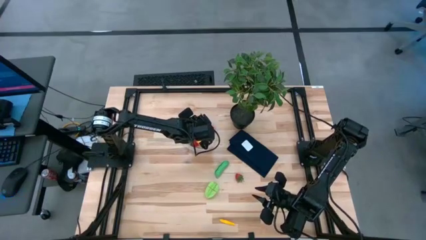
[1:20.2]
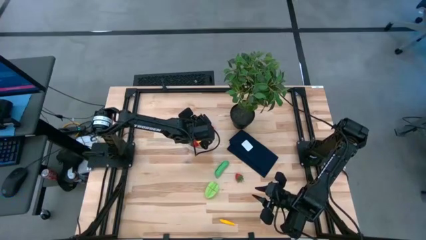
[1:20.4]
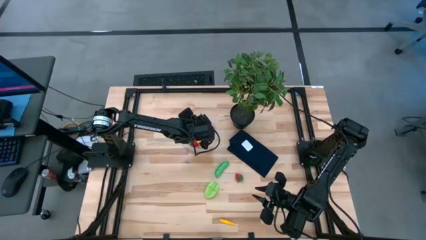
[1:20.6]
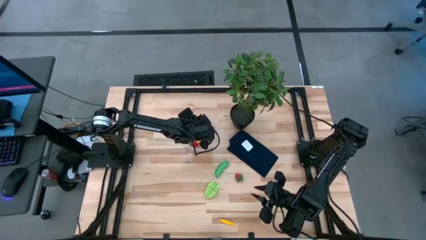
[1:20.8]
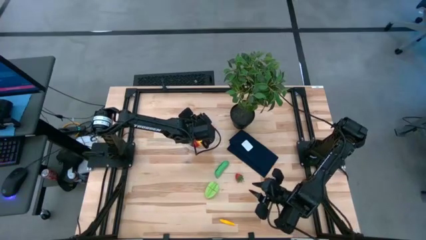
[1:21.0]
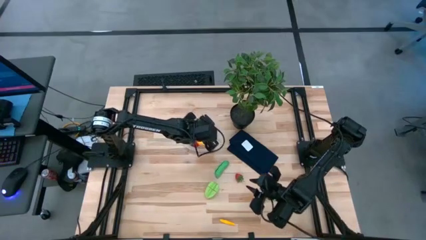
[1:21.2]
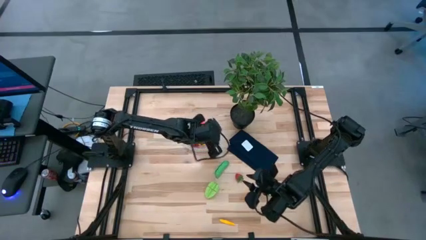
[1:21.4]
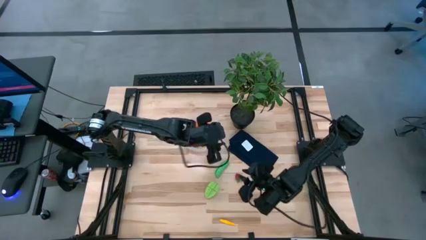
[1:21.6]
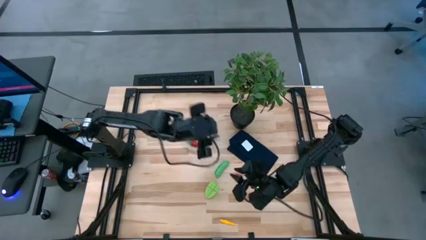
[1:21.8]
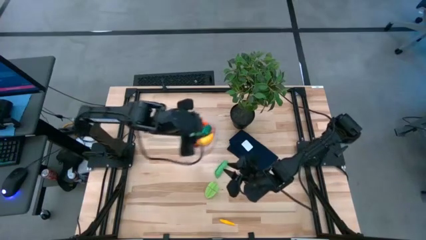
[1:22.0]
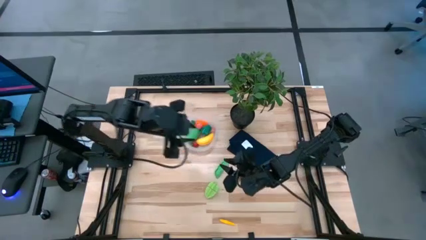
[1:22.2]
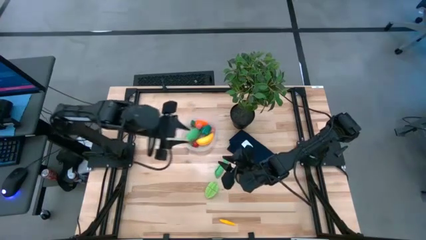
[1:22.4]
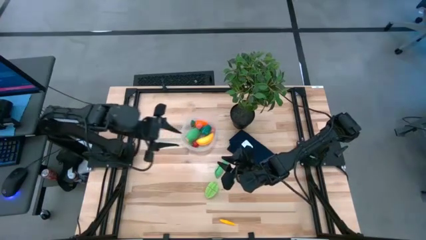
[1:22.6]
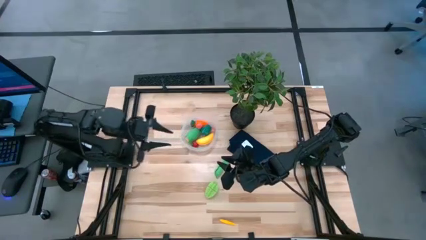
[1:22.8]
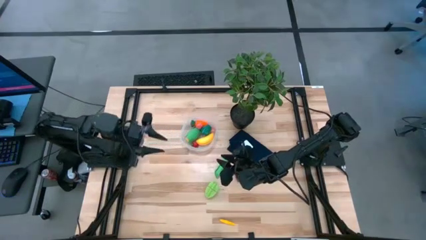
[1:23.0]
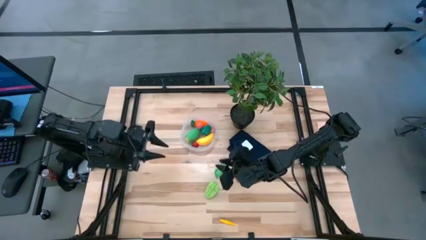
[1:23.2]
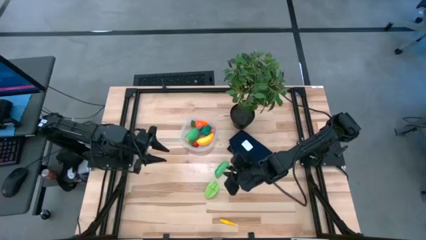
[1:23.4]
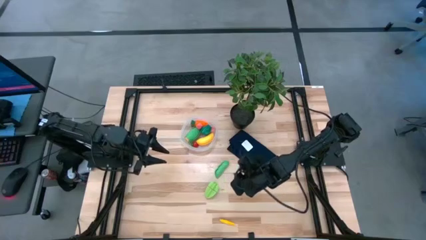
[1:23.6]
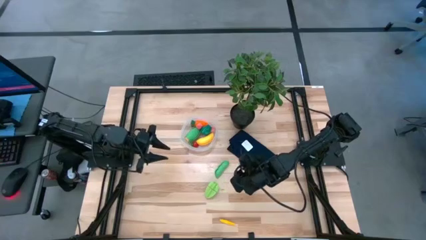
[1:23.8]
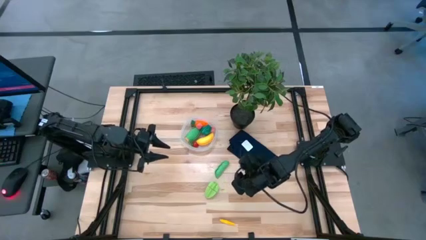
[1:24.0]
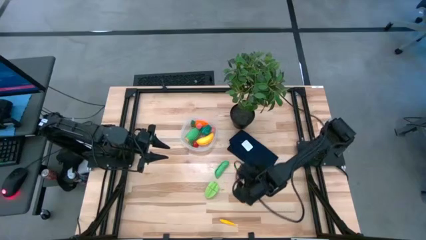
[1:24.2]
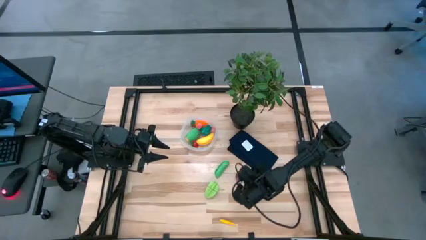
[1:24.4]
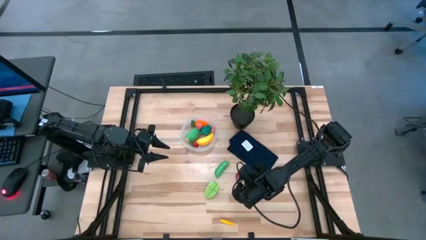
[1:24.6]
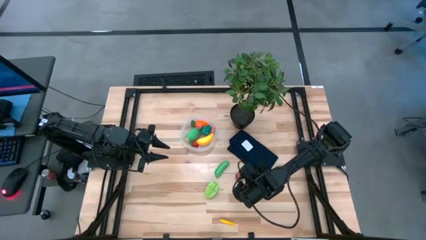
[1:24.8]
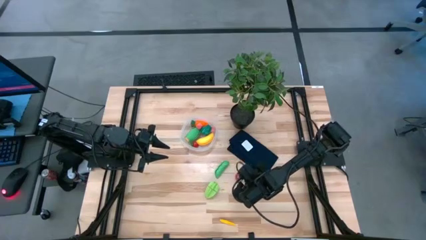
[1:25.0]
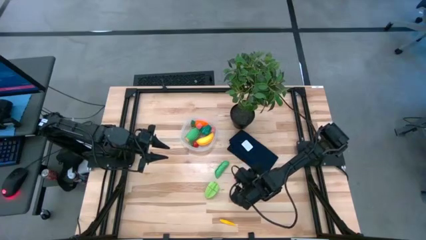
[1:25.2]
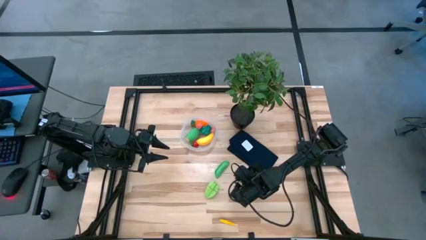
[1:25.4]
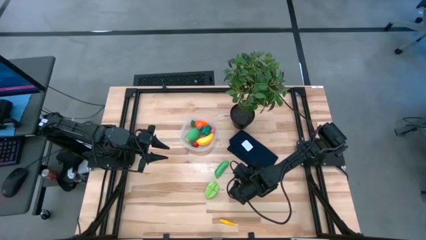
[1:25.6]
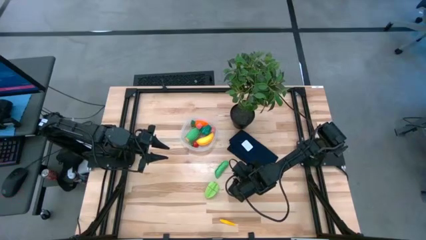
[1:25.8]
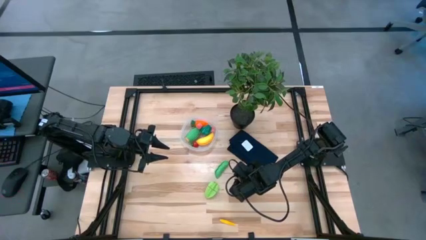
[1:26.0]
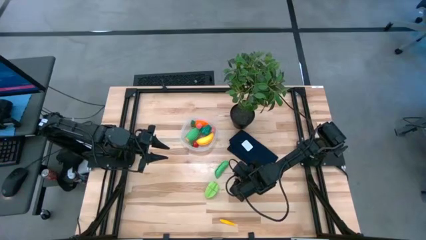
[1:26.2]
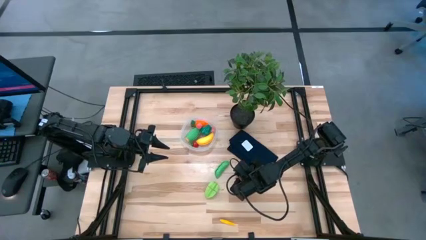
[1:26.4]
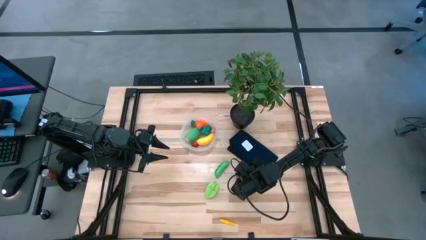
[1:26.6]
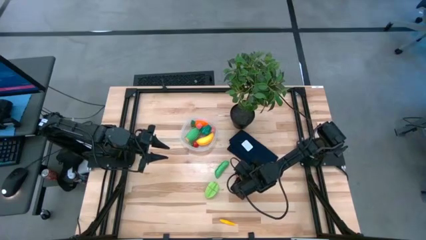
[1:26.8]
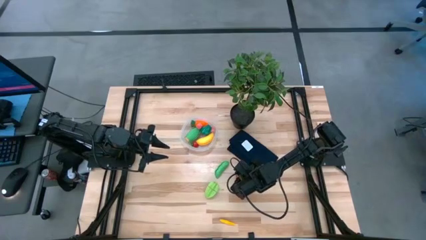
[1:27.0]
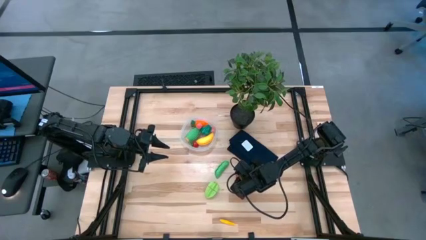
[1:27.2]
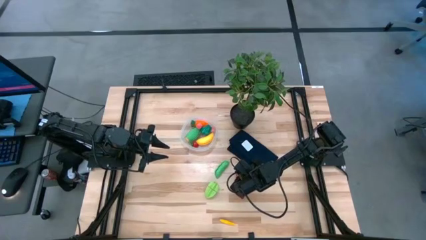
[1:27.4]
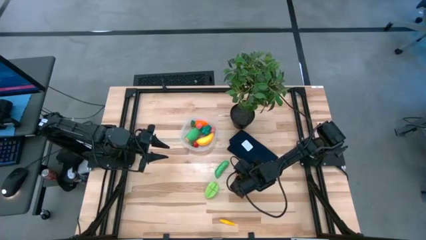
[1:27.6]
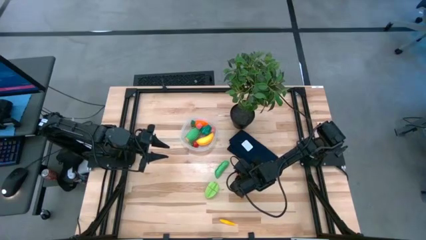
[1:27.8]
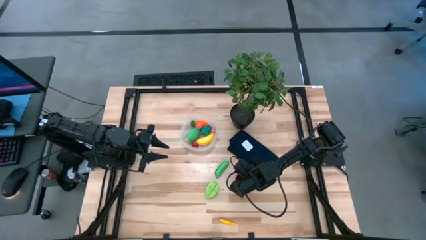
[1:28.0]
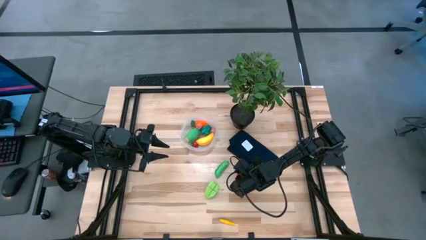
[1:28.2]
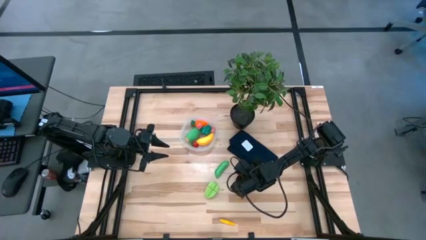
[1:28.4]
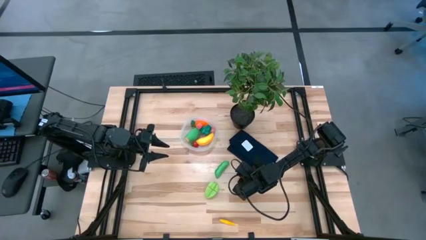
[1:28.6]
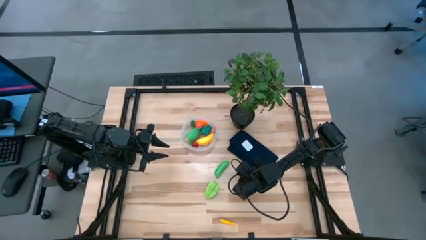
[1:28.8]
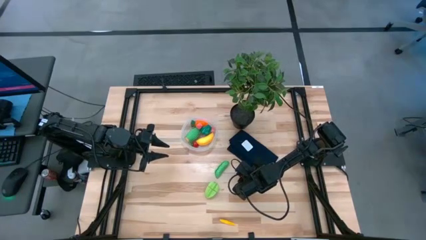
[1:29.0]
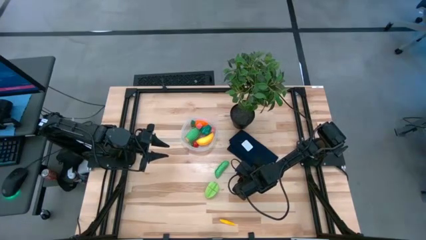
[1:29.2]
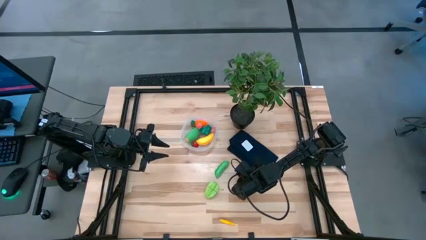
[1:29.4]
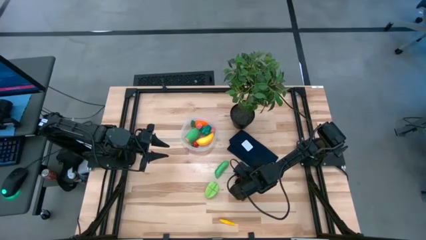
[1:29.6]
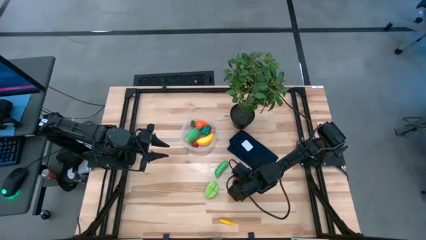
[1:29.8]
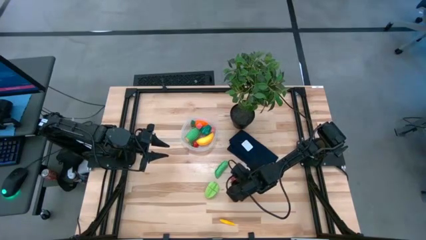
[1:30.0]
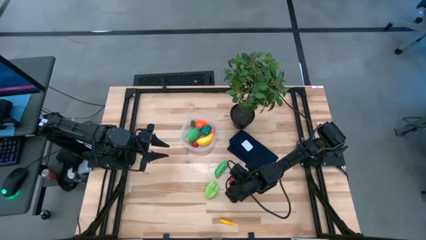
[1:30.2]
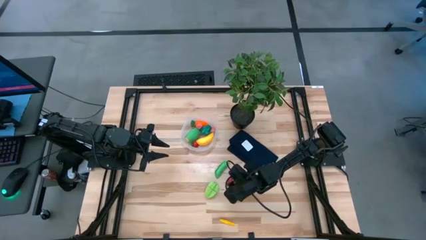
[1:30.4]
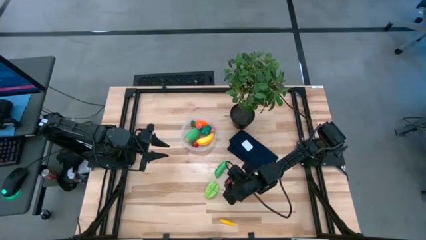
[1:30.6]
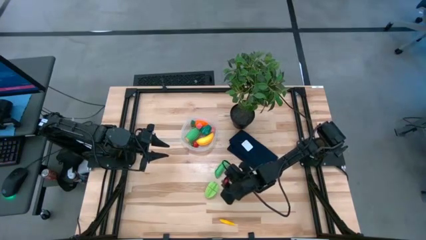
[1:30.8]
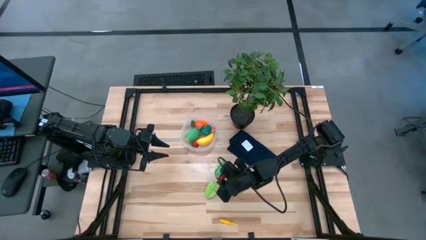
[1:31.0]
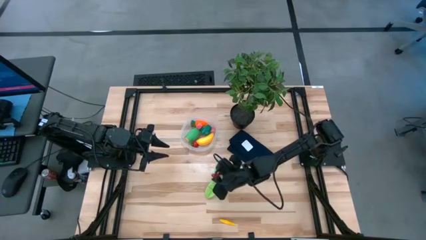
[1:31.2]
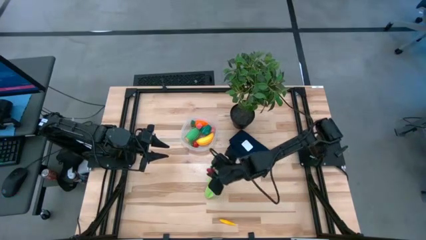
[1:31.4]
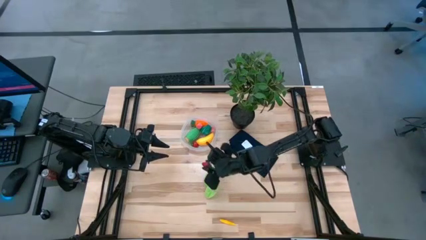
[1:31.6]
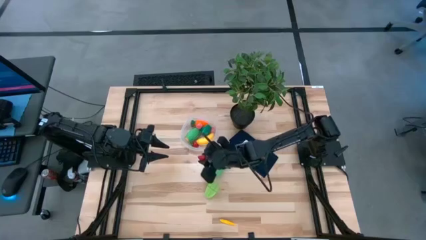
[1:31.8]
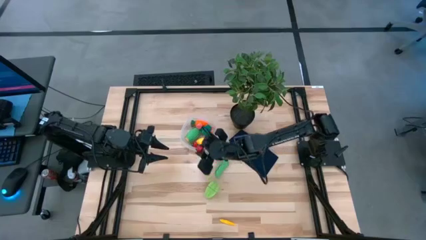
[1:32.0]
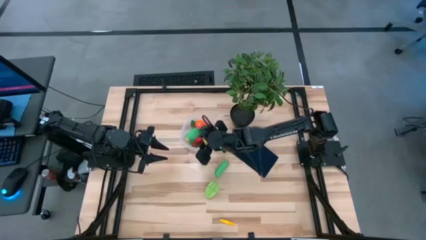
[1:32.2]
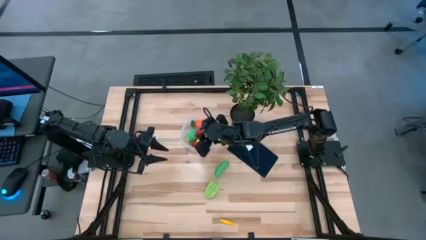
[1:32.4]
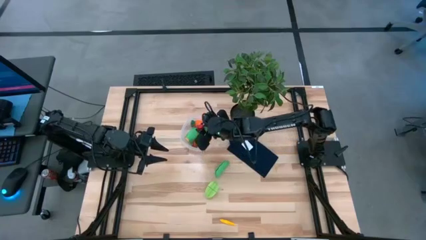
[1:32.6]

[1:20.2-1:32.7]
Task: Pick and placing Produce into tupperware
Put the red strawberry into the transparent bin

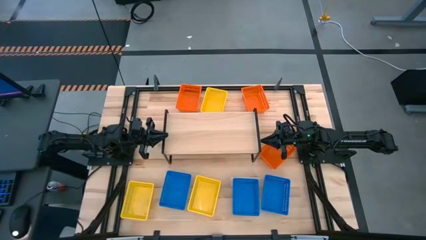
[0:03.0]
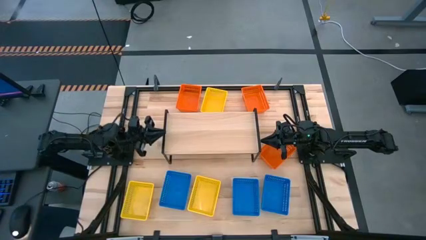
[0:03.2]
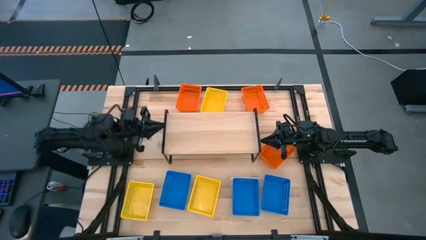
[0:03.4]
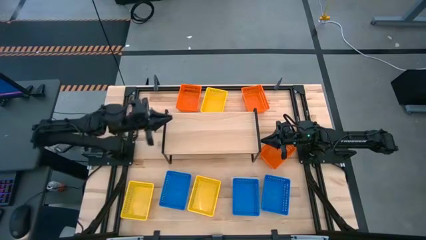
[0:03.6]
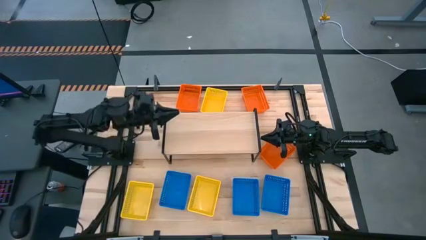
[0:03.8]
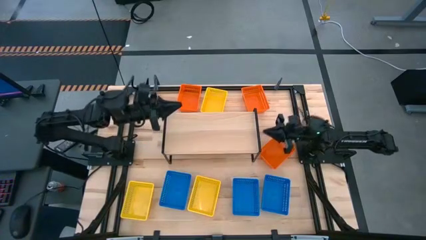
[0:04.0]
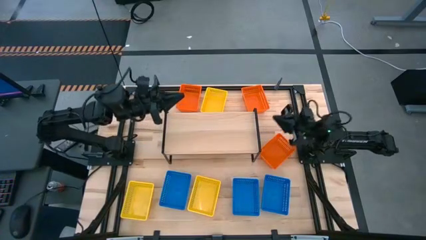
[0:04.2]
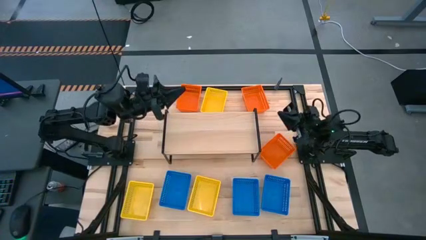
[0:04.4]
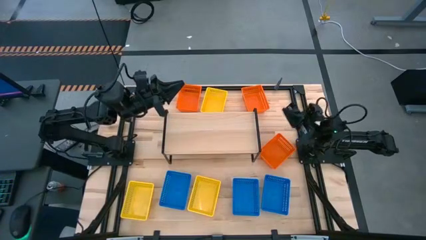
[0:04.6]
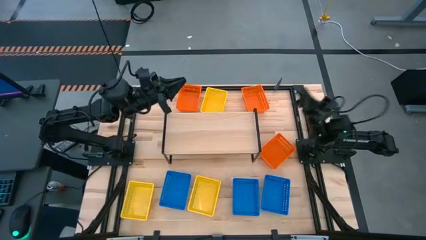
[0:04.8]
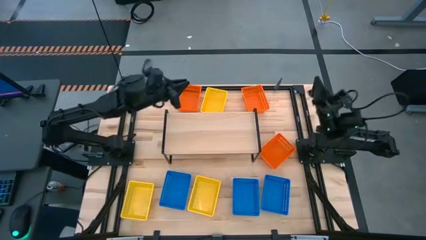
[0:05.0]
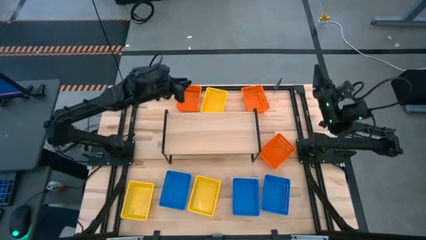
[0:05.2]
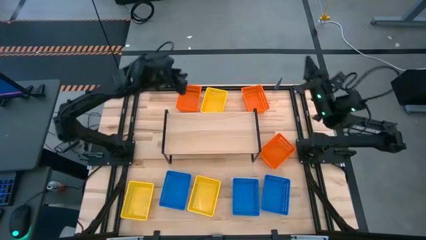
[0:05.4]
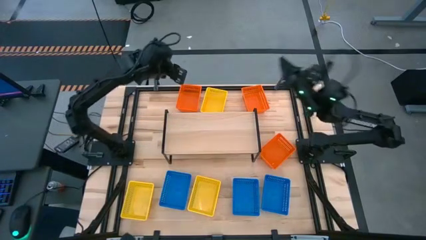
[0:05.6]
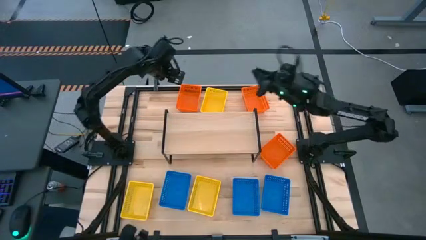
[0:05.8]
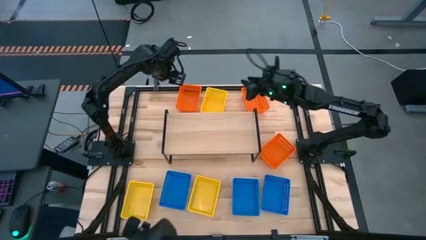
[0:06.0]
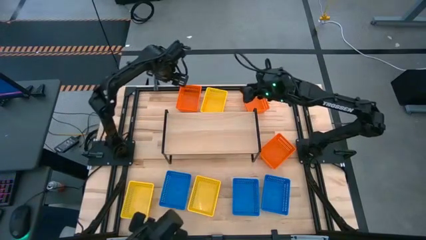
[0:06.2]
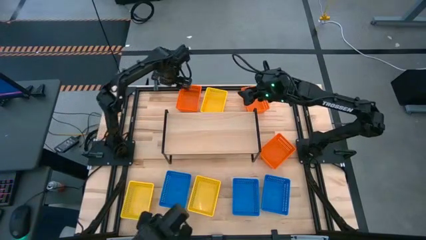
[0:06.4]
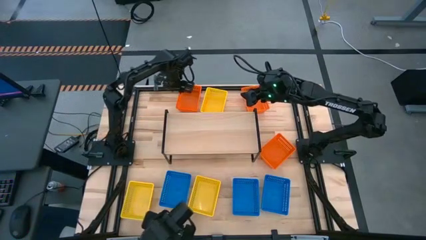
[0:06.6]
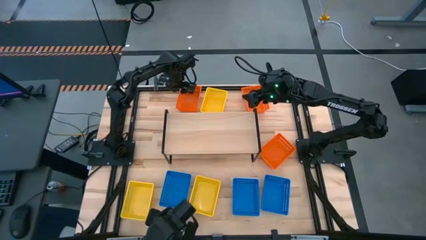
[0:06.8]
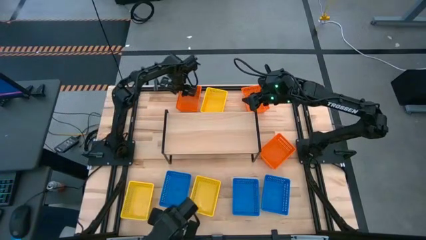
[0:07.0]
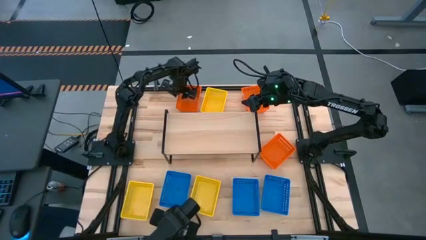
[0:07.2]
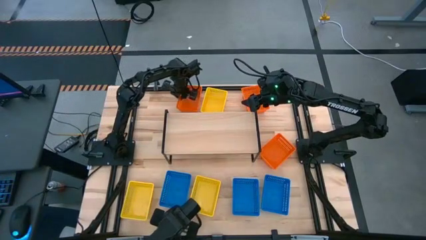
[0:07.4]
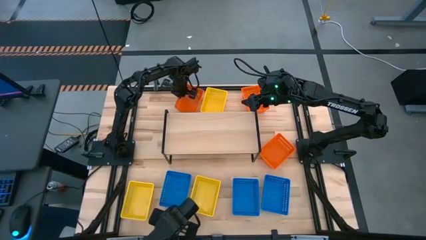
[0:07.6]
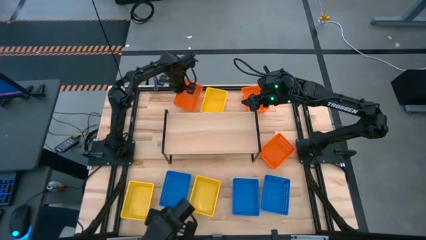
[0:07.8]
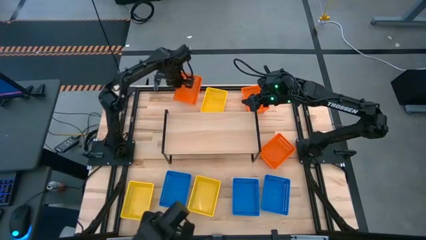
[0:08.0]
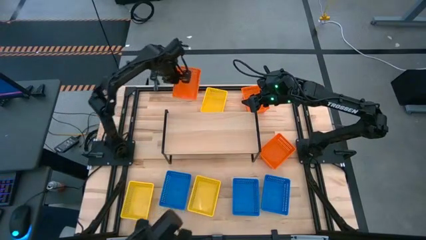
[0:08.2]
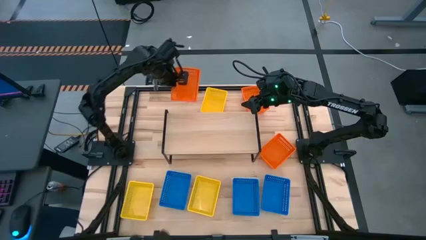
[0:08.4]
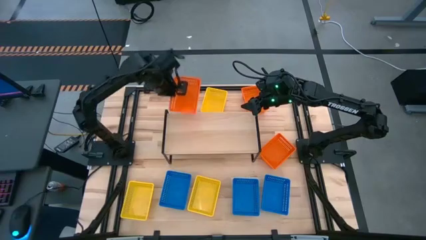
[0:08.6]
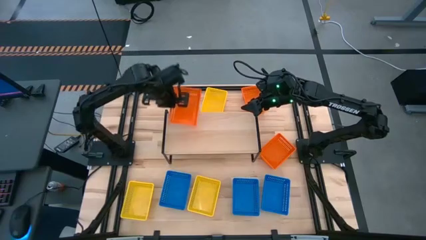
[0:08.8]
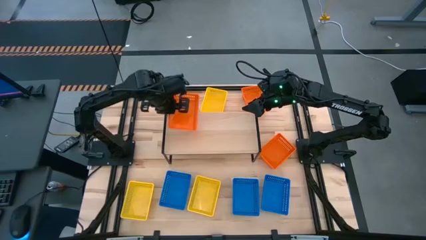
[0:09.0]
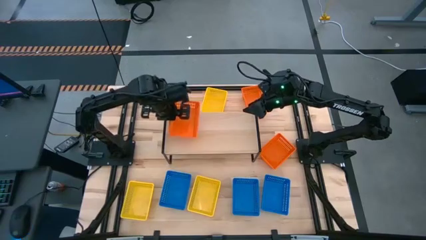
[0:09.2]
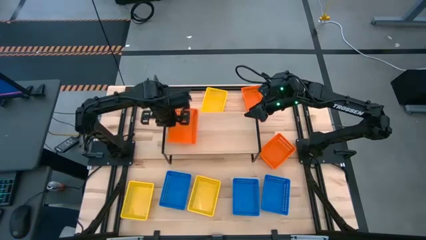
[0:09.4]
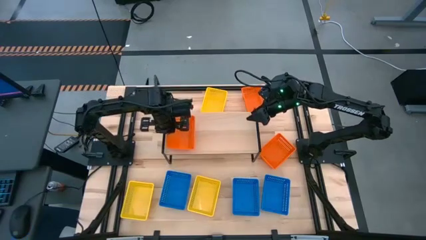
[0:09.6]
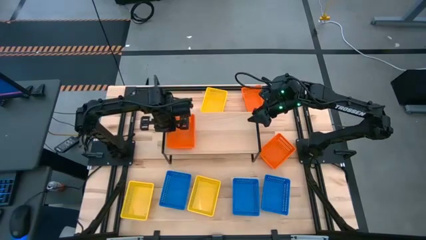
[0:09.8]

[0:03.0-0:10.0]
Task: Stack baskets on shelf by color
Put the top left orange bin on the shelf
